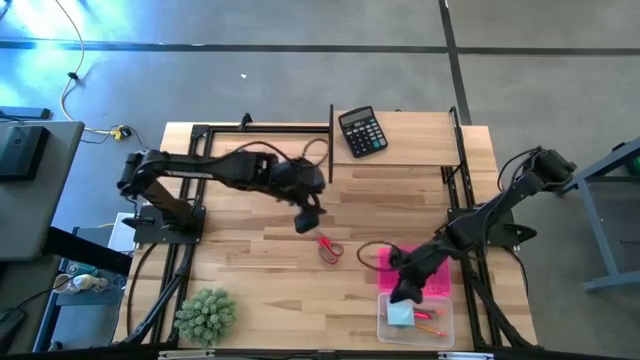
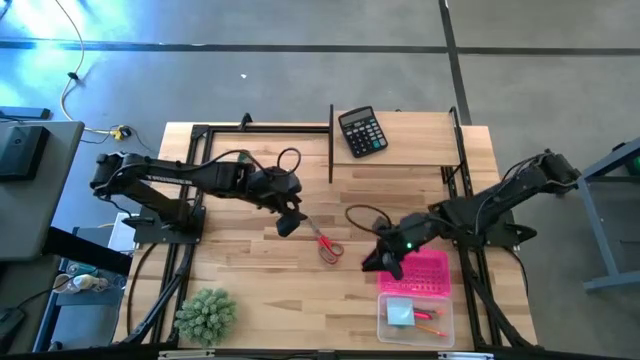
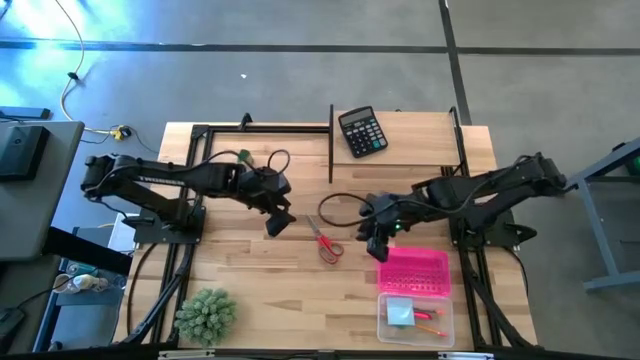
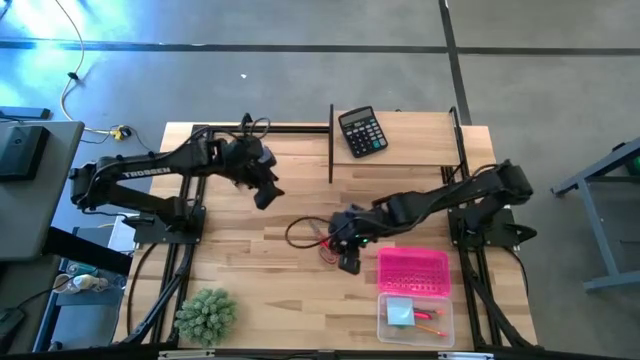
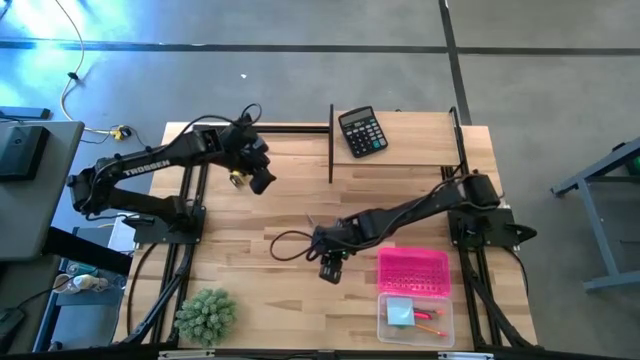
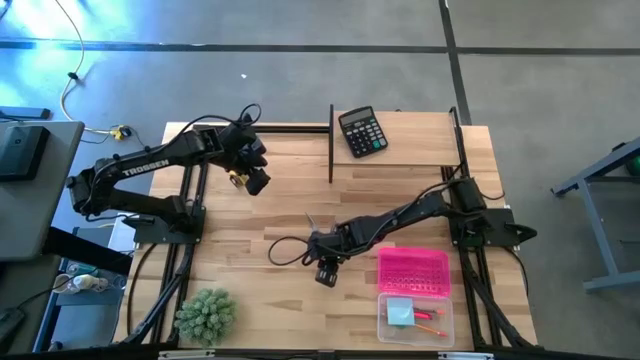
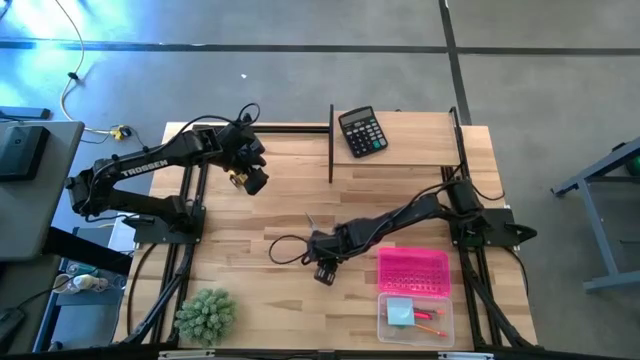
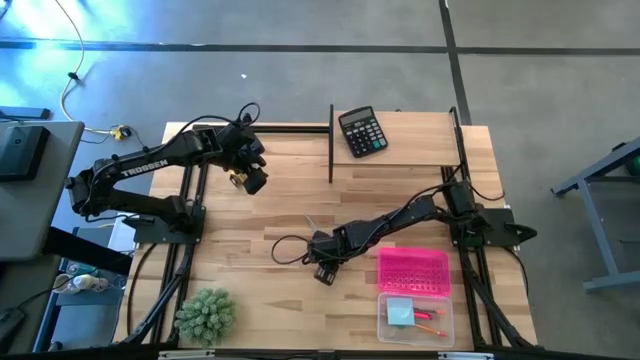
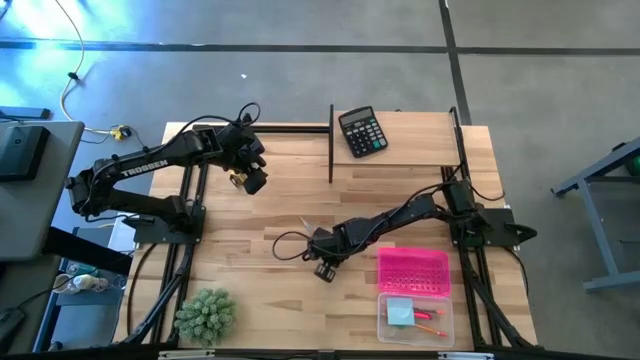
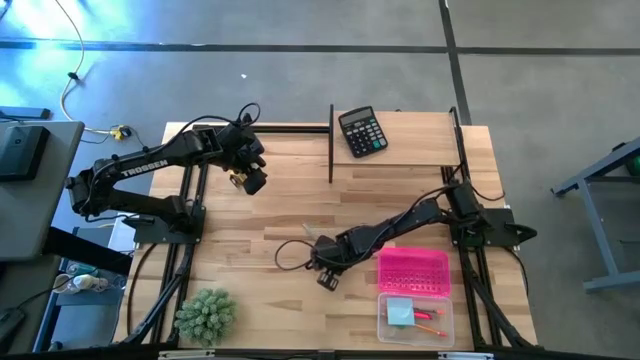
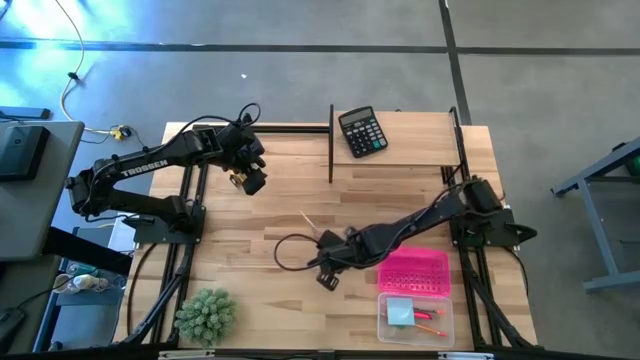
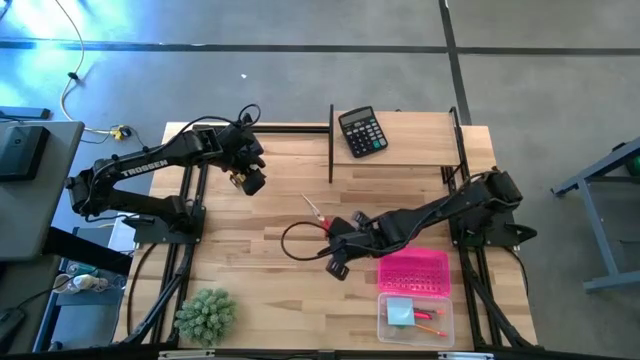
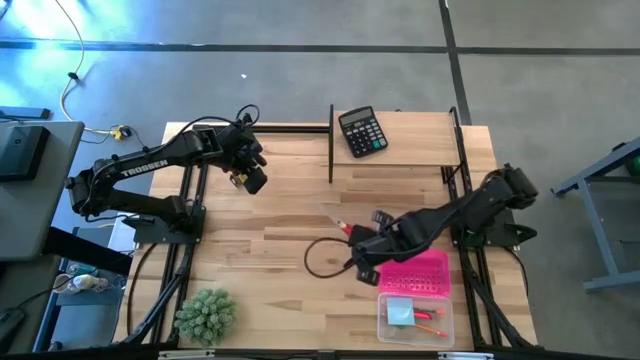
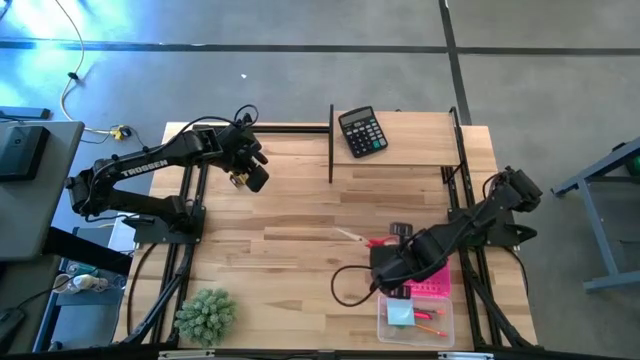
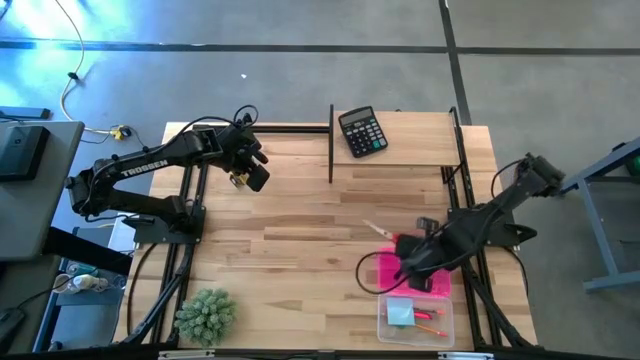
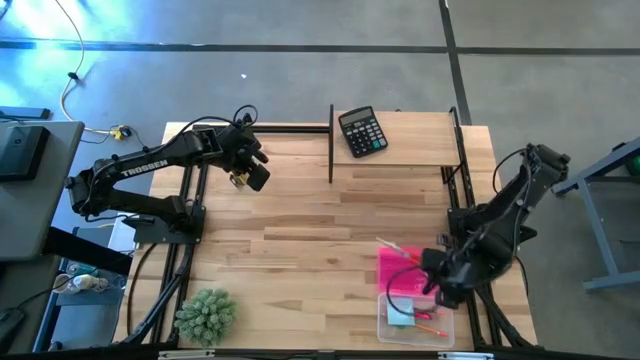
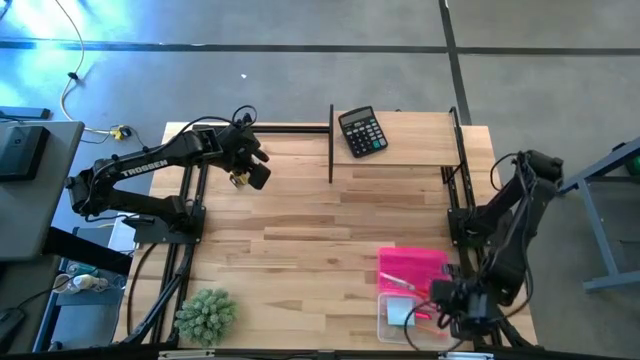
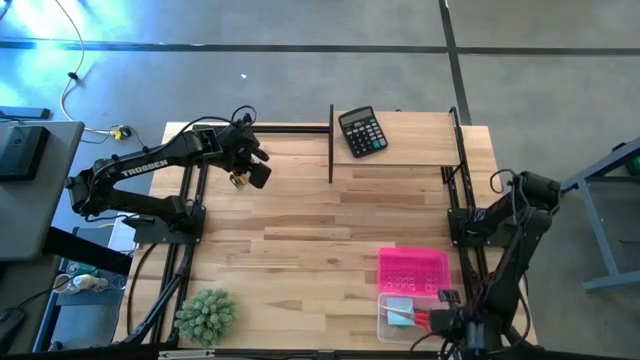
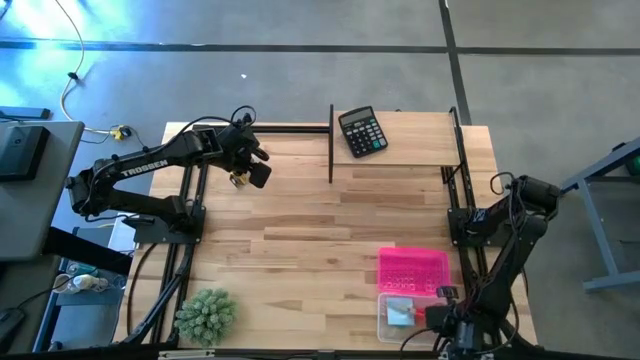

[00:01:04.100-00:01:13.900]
Task: Pack school essentials
Put the red scissors into the supply box

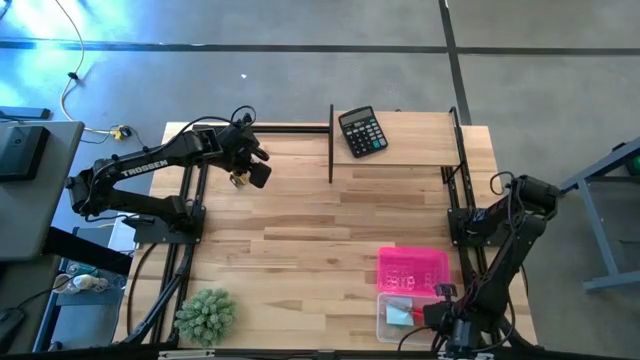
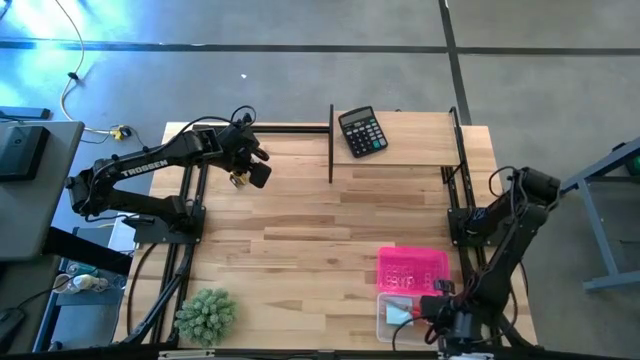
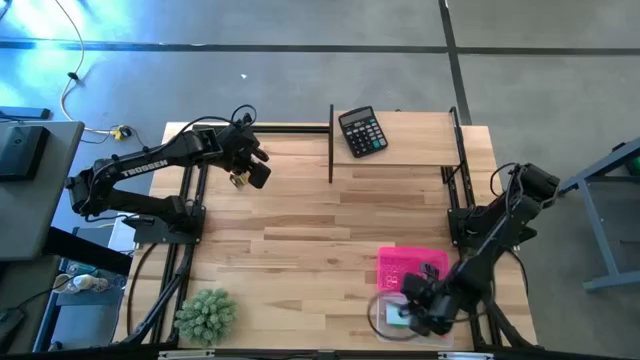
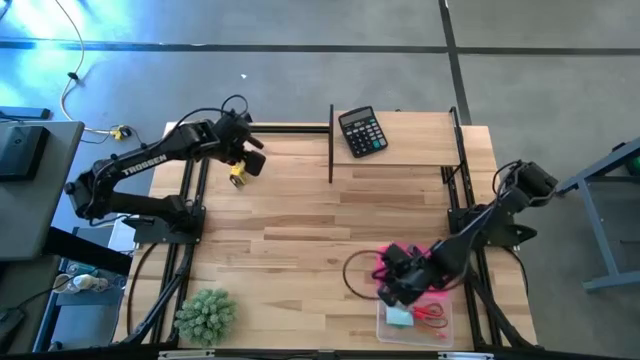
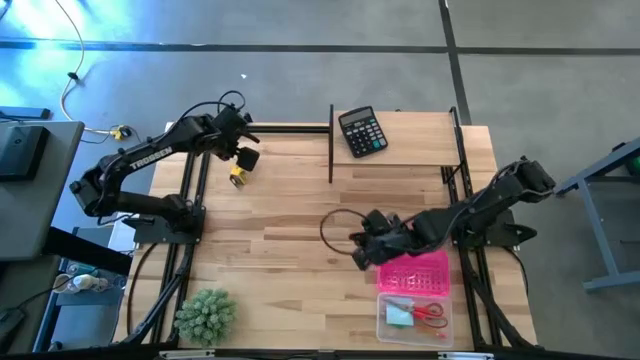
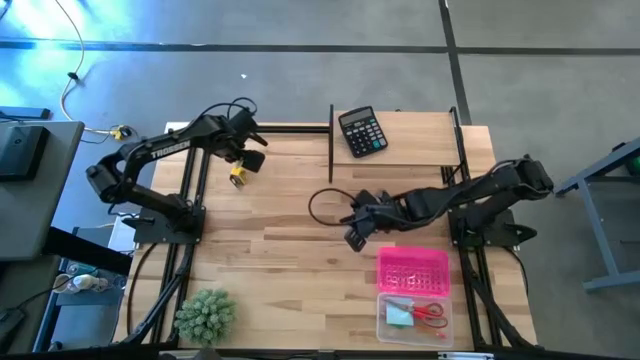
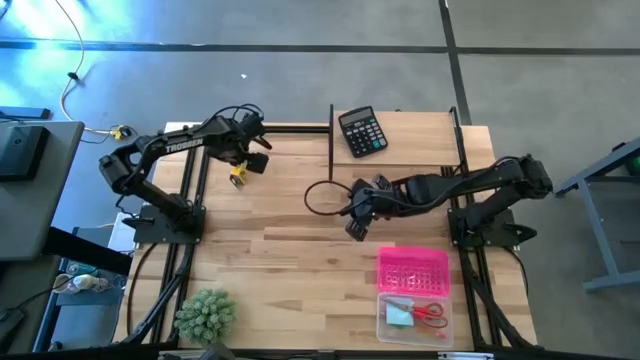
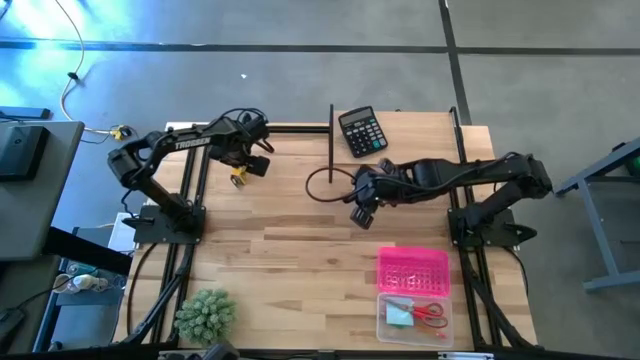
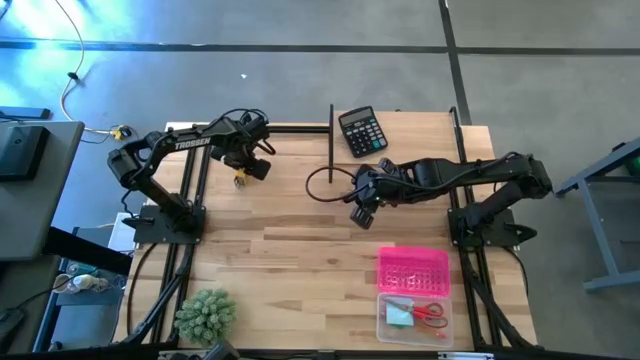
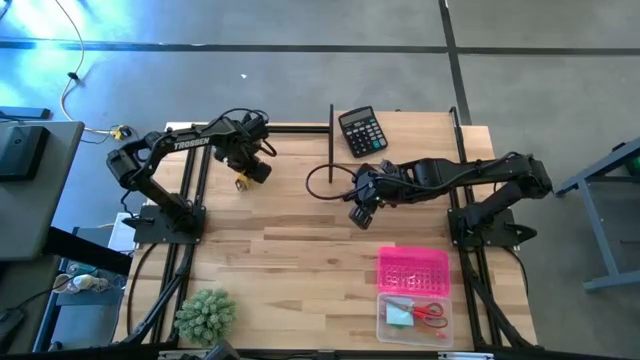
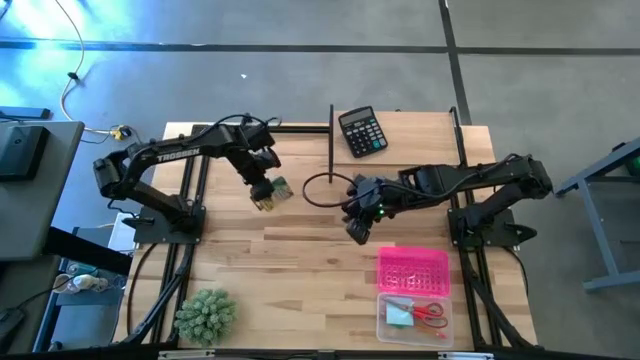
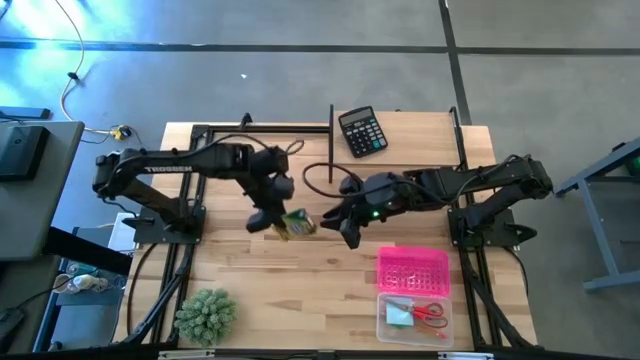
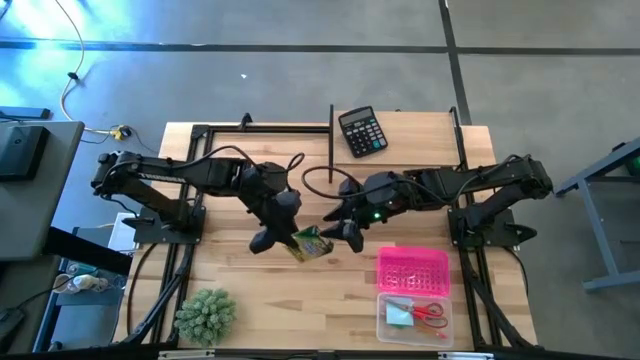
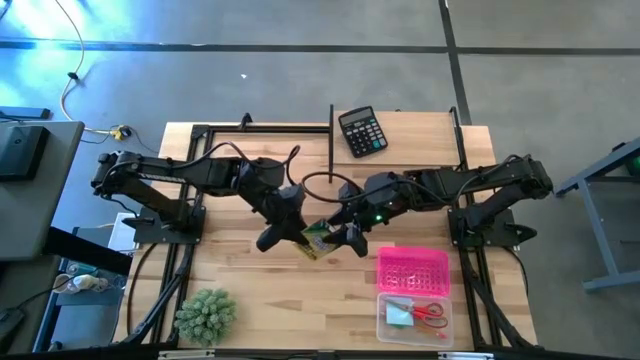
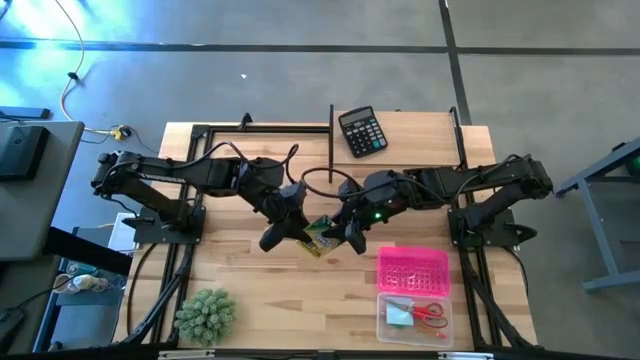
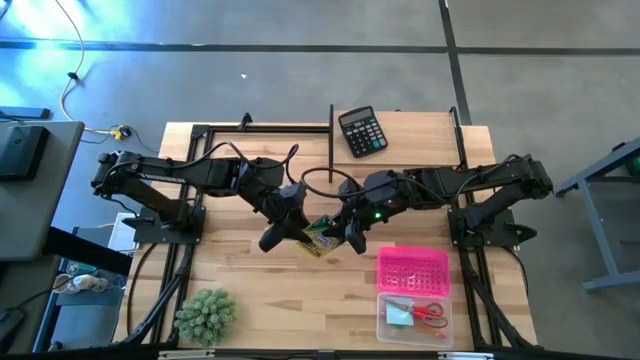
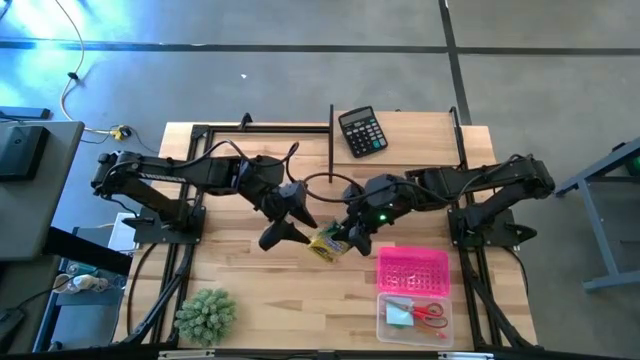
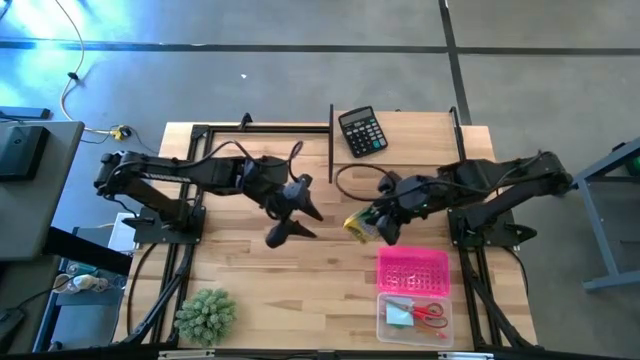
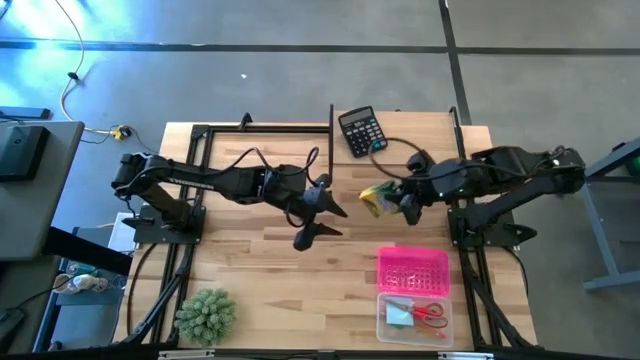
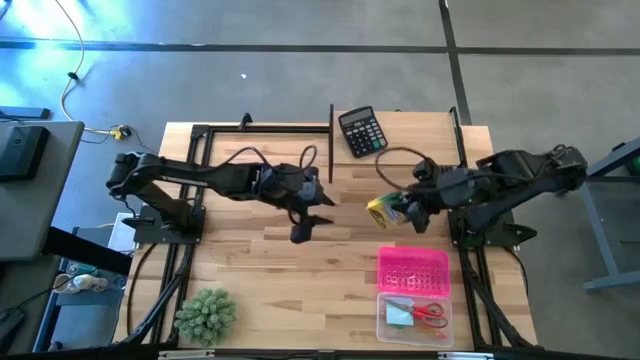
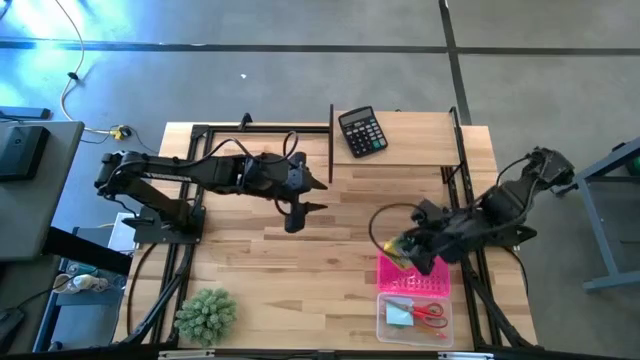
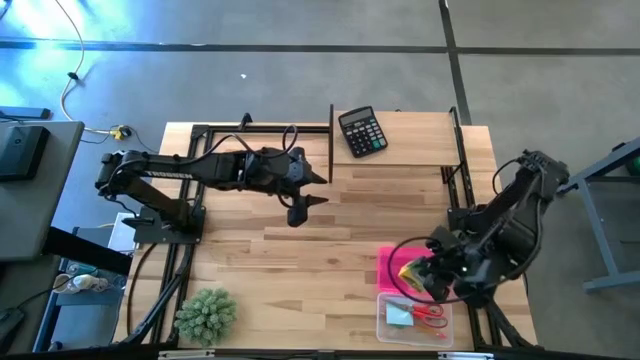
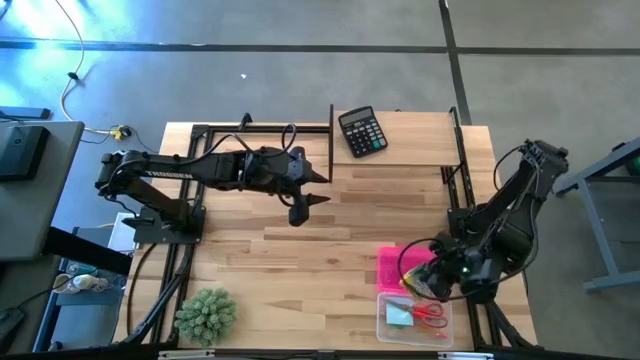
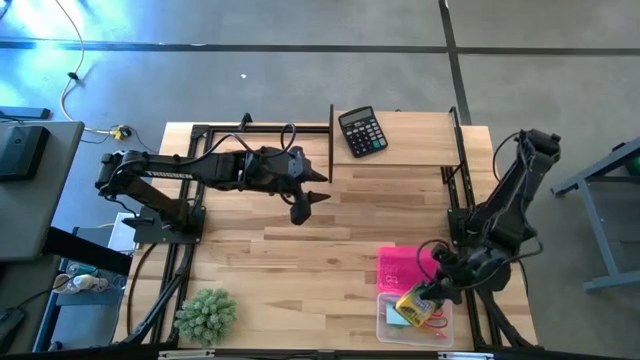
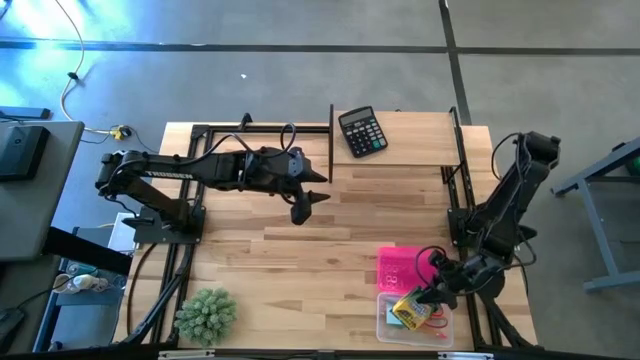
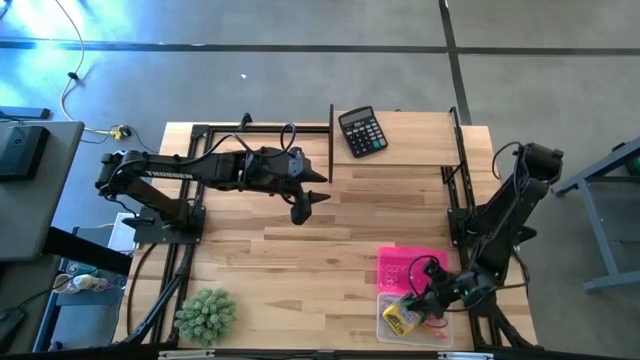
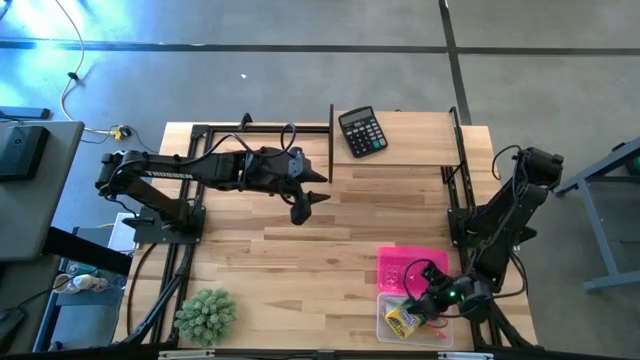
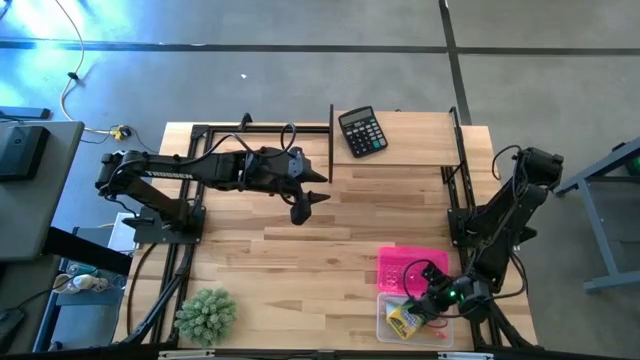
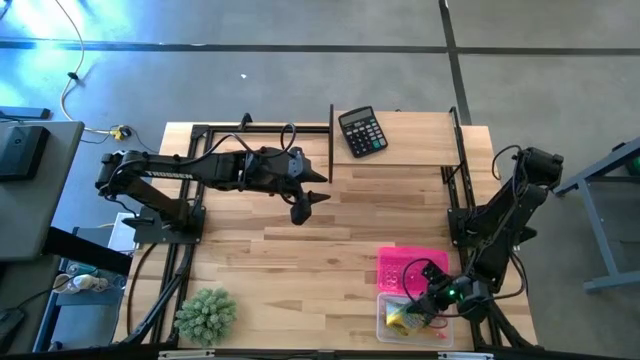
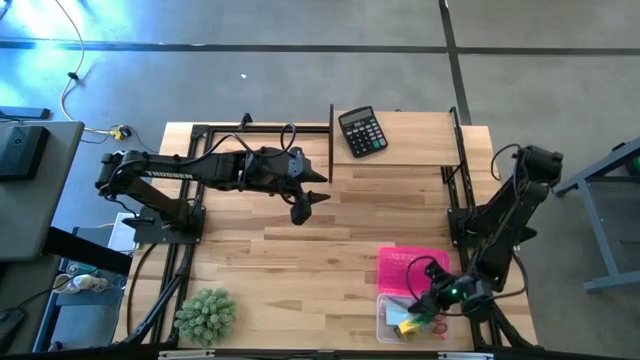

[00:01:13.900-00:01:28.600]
Put the yellow crayon box into the supply box
